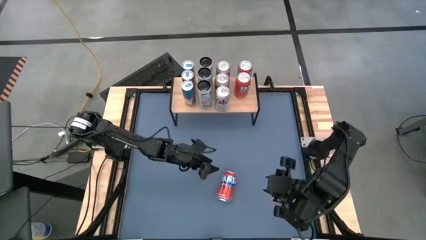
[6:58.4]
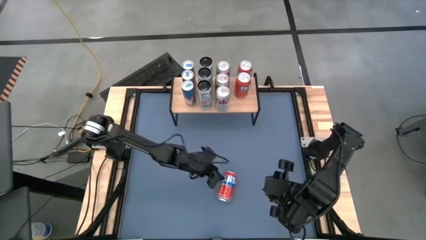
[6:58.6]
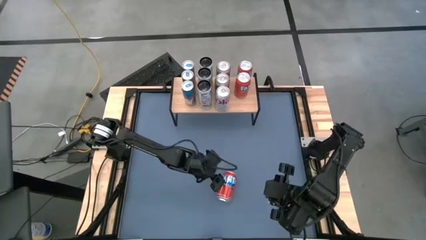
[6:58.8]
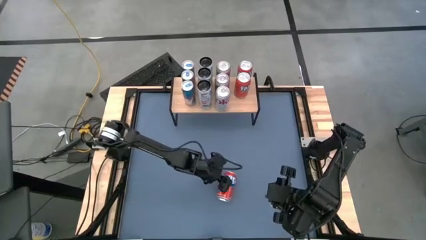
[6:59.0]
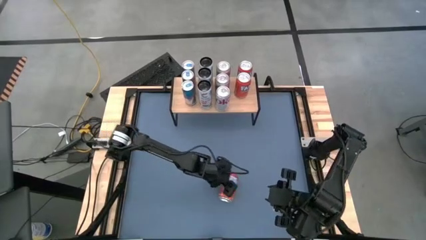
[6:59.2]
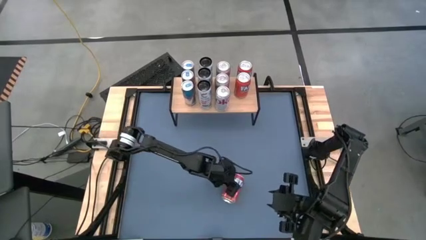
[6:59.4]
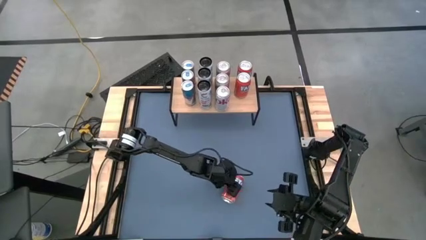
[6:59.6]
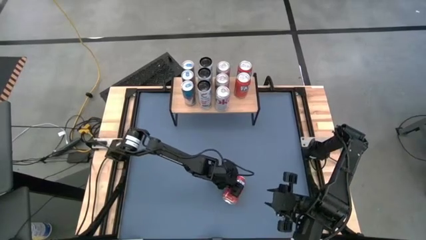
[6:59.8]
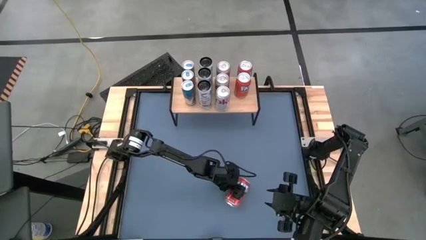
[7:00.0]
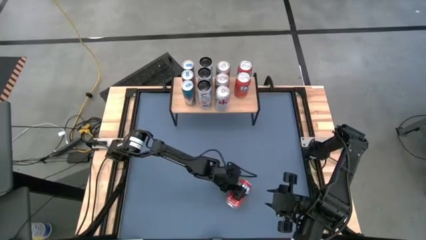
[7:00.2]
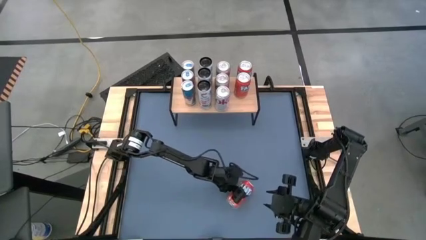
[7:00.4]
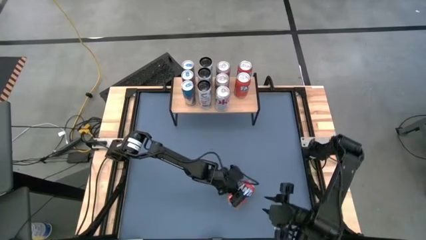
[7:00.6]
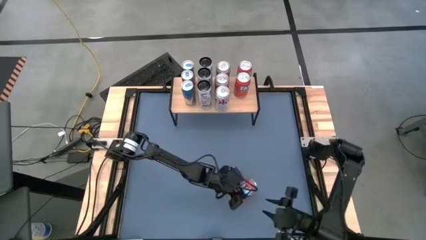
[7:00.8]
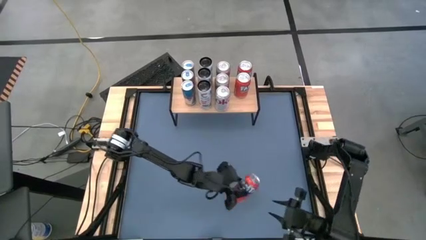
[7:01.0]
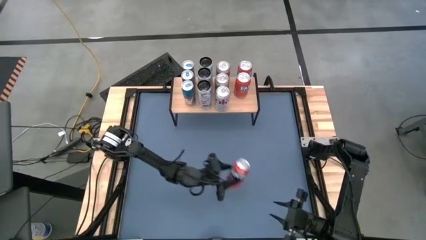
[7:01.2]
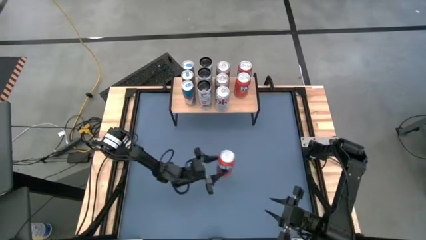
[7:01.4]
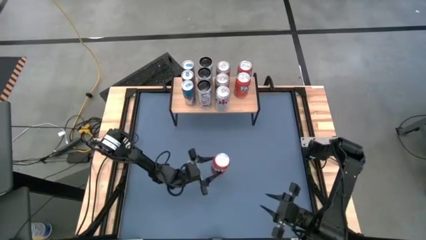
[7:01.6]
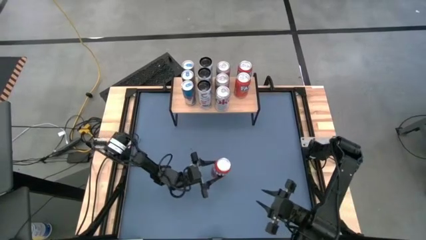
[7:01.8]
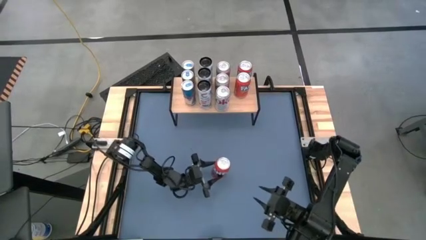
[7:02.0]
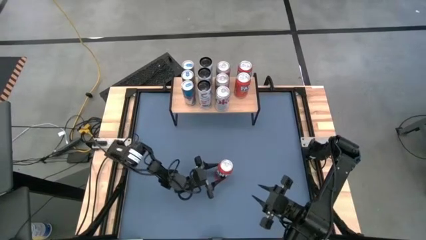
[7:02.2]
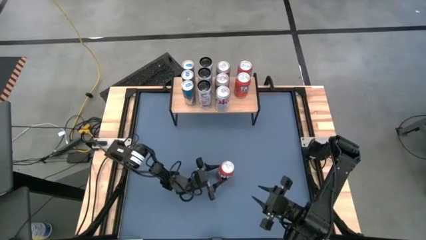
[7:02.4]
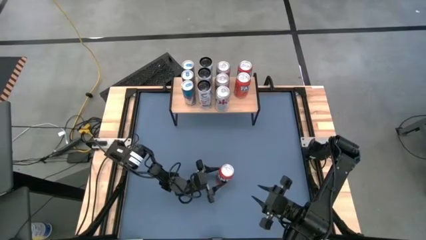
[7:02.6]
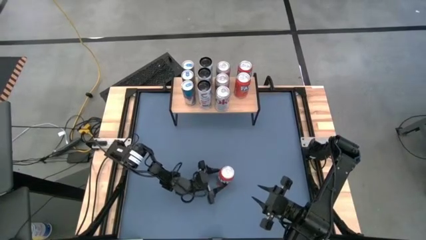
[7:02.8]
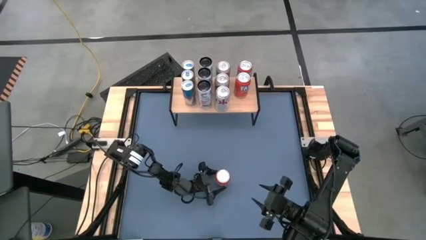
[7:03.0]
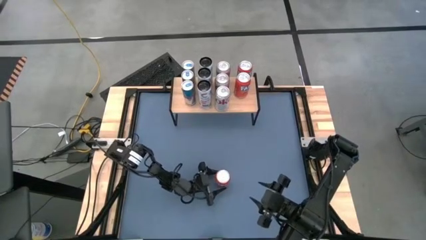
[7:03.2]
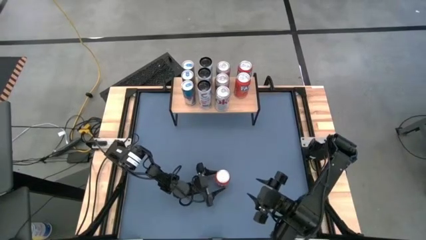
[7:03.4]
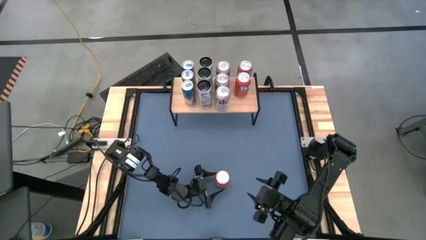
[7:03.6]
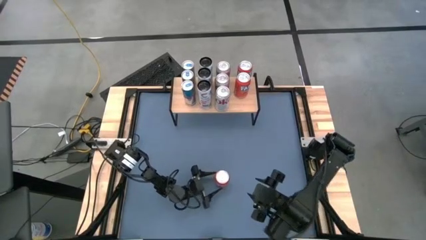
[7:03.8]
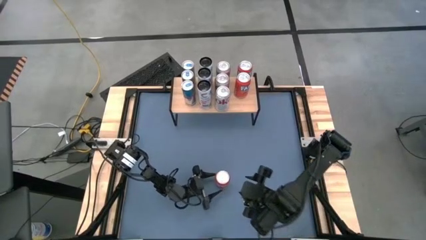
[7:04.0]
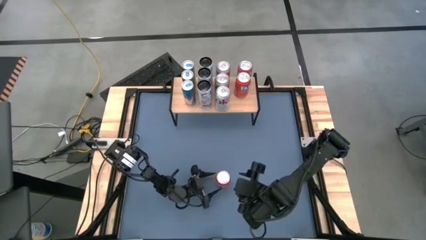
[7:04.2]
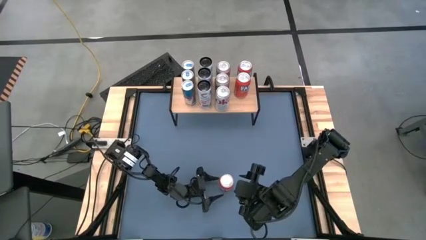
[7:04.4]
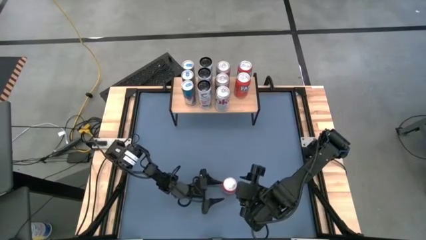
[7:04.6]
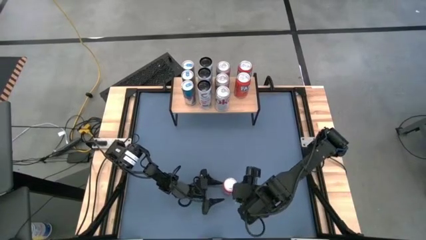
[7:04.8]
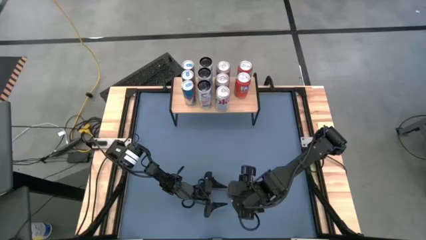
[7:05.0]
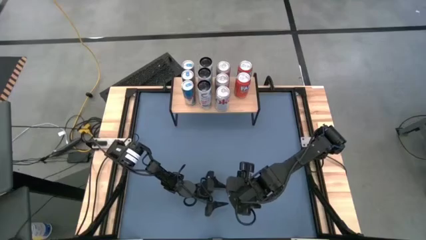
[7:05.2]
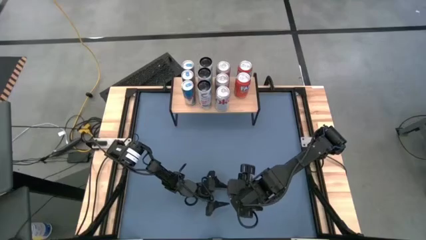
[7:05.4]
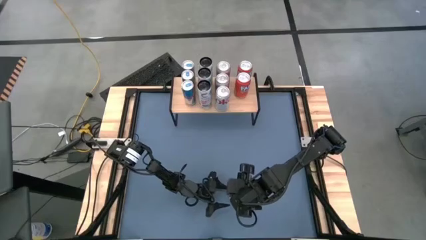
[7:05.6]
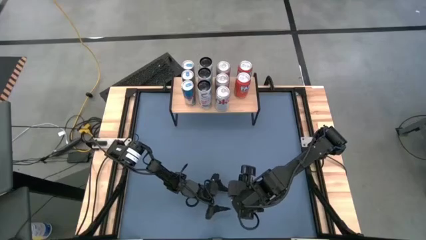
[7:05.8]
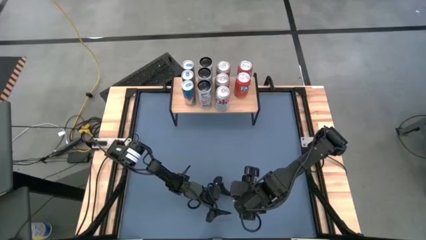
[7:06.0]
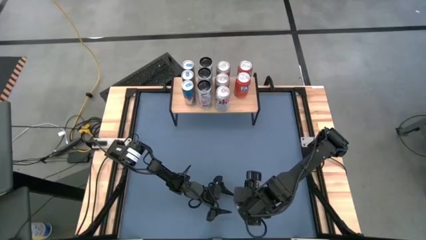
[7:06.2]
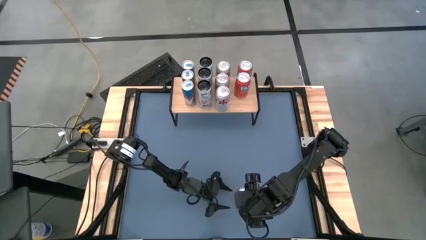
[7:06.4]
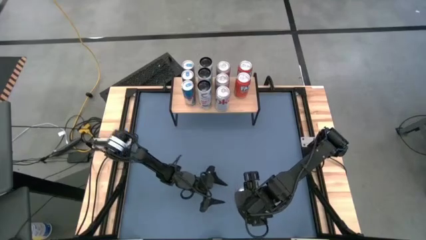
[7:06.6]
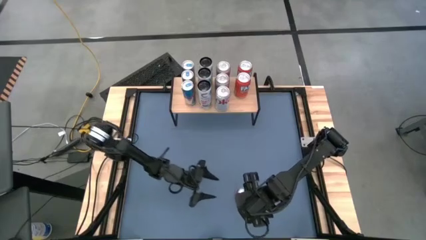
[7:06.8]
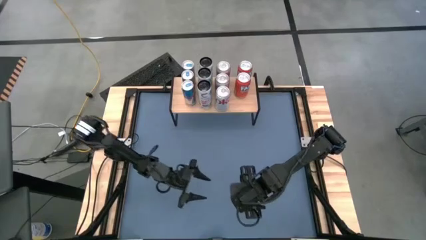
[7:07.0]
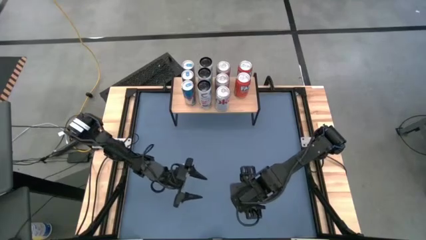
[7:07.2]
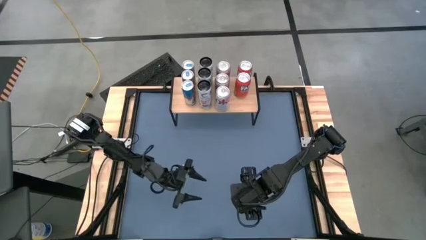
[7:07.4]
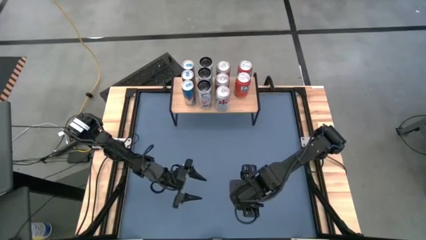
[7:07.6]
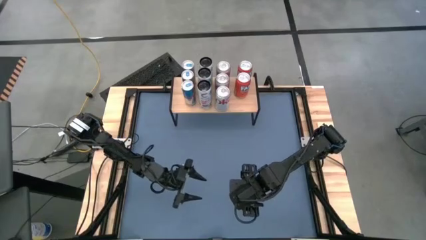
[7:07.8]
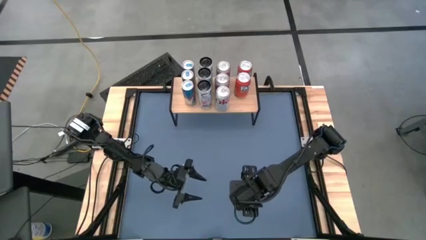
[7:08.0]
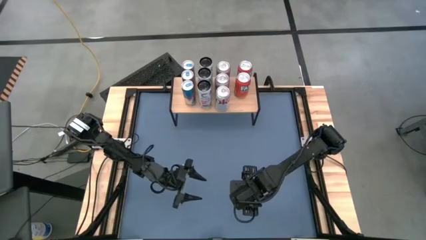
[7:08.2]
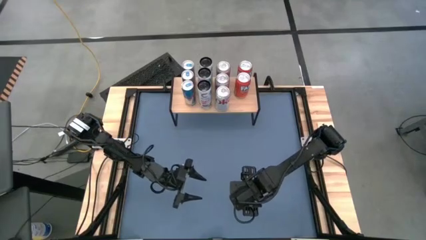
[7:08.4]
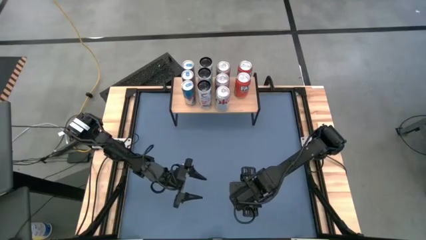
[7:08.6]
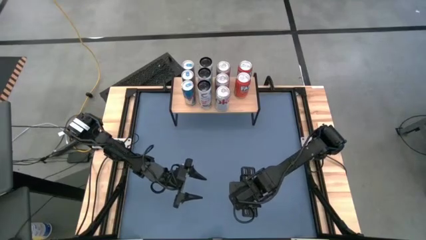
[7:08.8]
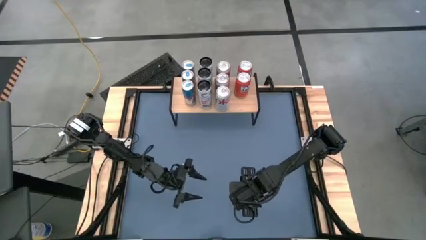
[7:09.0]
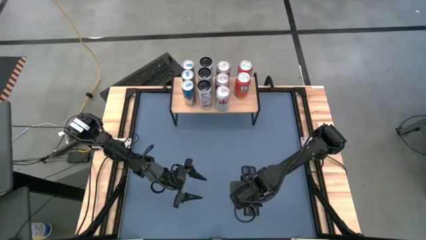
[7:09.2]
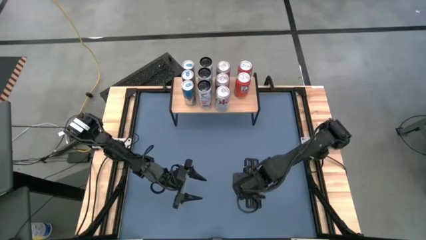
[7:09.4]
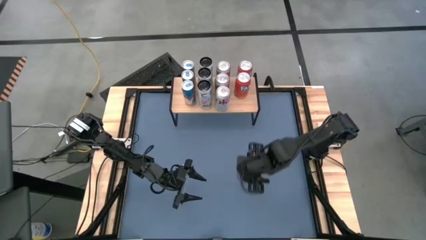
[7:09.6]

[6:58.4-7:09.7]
Task: Place canned beverage on shelf
Put the orange soda can on the shelf aligned with the other orange soda can

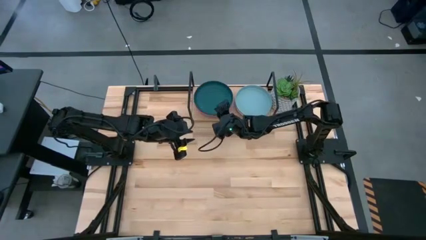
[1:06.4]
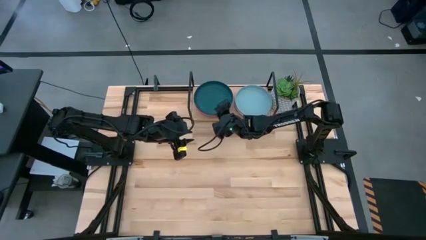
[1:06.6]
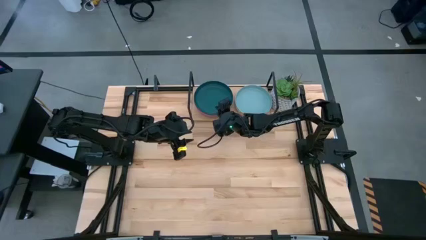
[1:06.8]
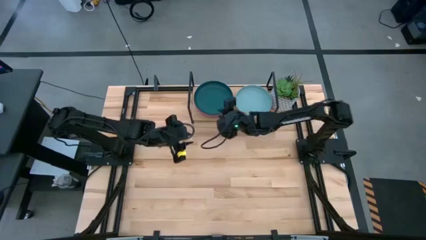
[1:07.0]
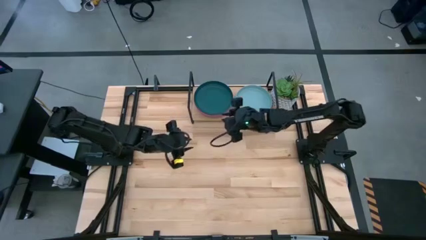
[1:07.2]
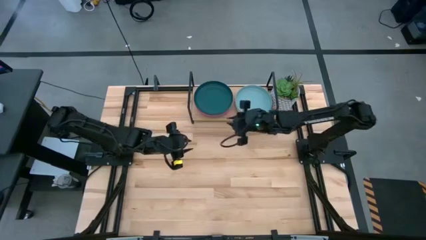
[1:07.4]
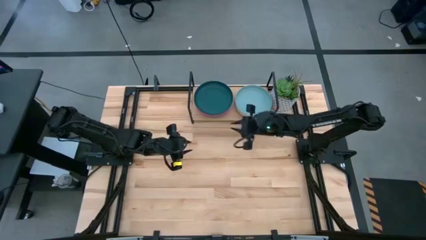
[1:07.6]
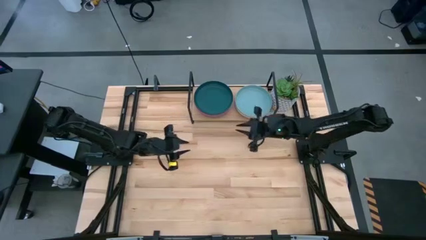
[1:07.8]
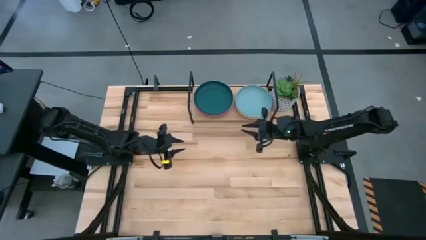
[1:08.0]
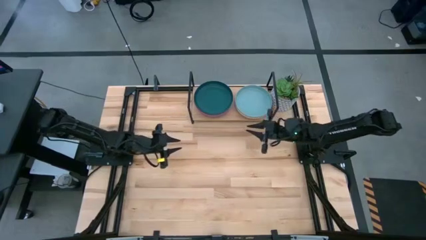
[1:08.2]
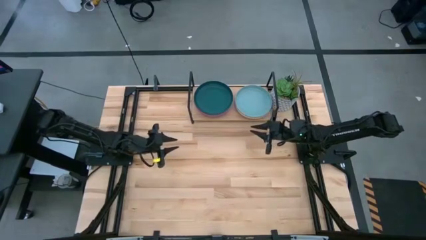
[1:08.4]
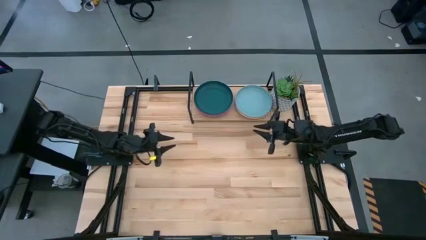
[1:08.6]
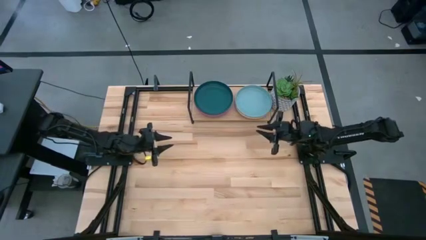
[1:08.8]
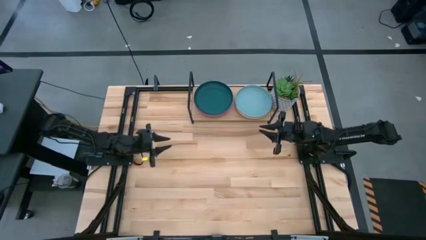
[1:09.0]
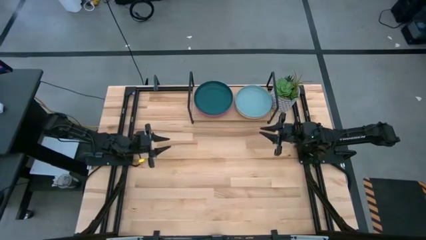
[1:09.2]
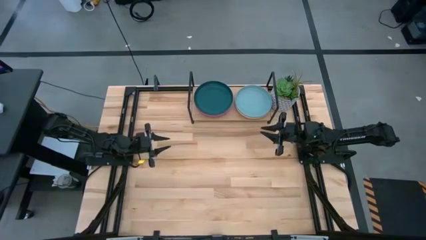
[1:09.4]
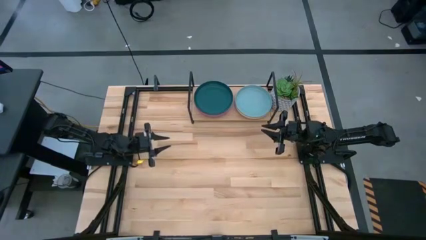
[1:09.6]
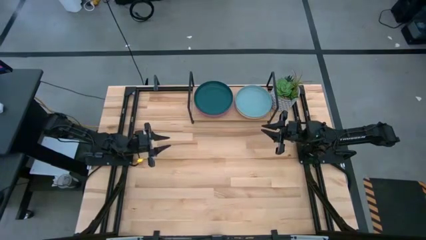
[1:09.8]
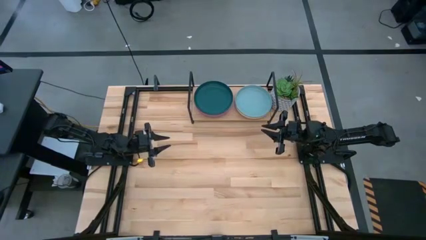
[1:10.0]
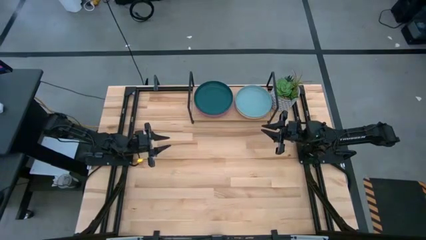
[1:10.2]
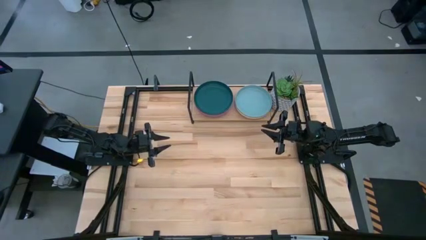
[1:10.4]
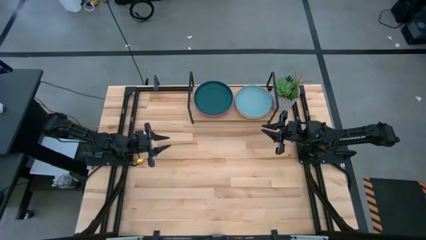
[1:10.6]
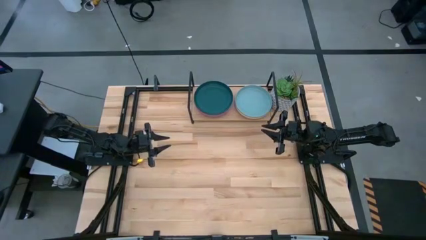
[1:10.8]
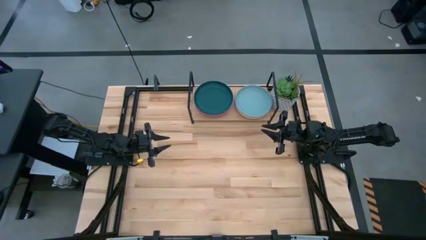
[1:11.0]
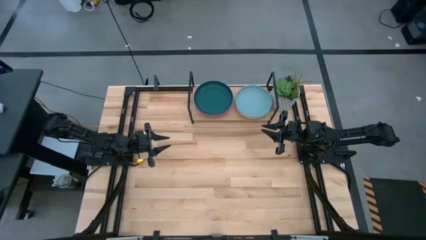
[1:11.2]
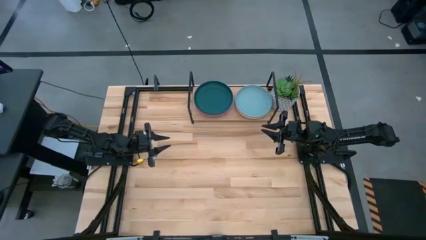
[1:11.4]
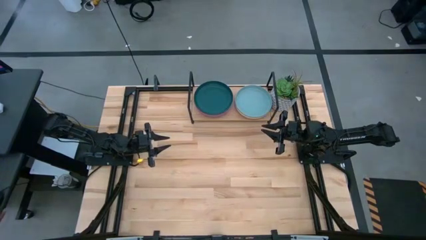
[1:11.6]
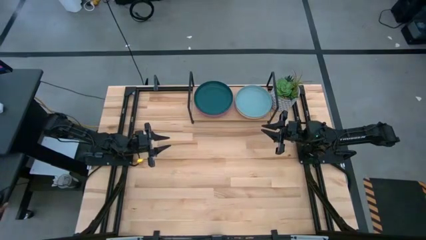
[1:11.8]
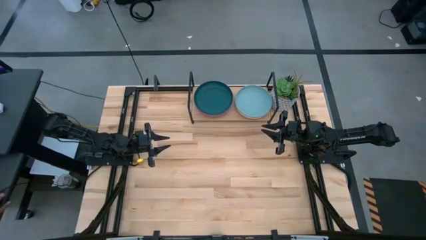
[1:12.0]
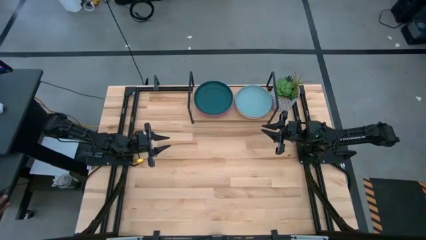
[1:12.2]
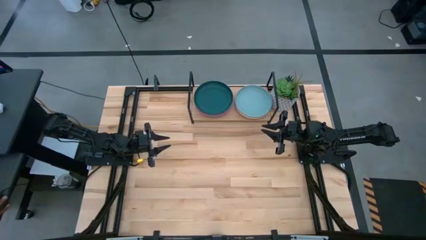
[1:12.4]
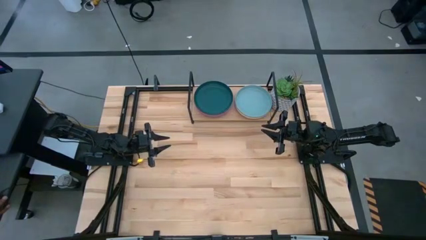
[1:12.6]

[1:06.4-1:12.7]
Task: Place and stack plates onto a shelf
Return to Home Position
